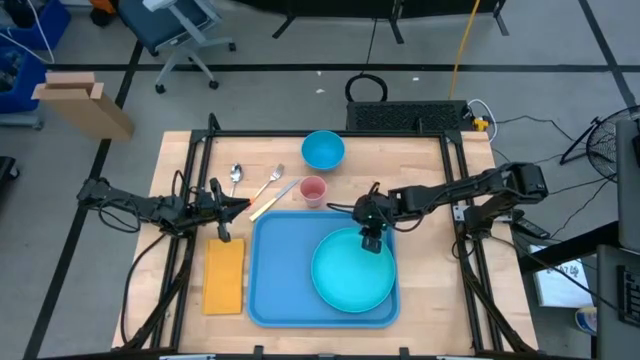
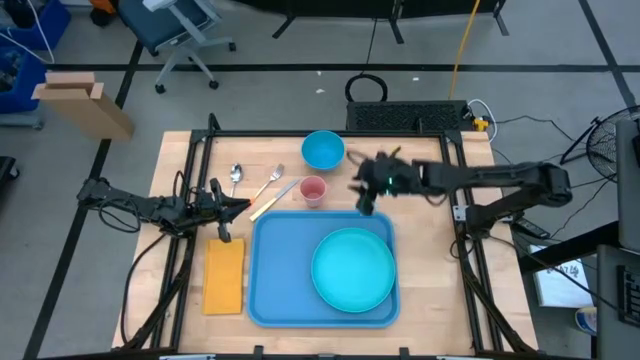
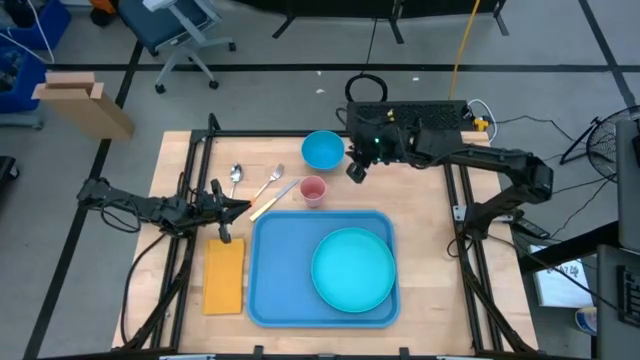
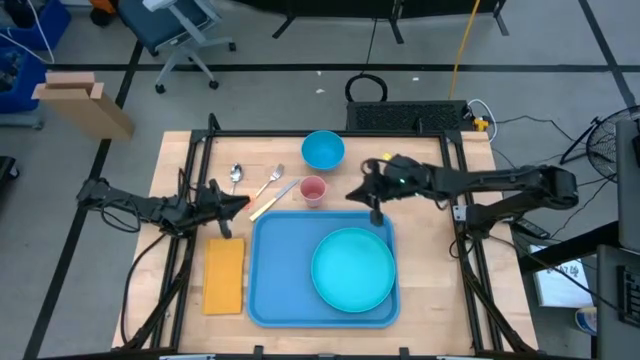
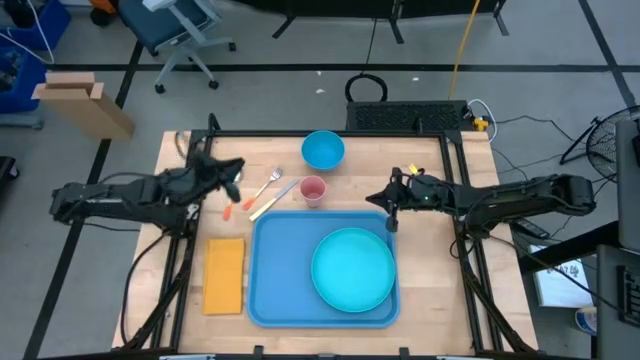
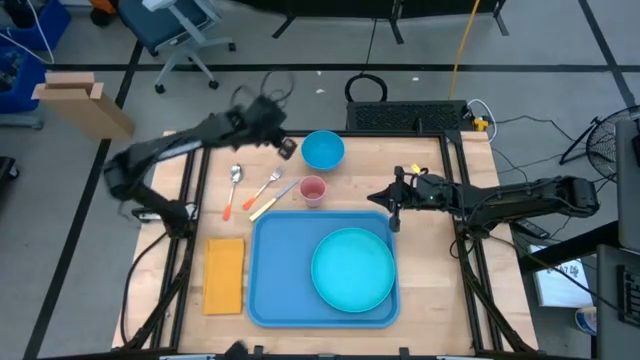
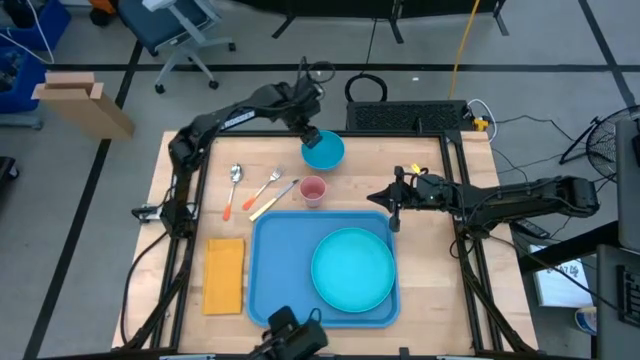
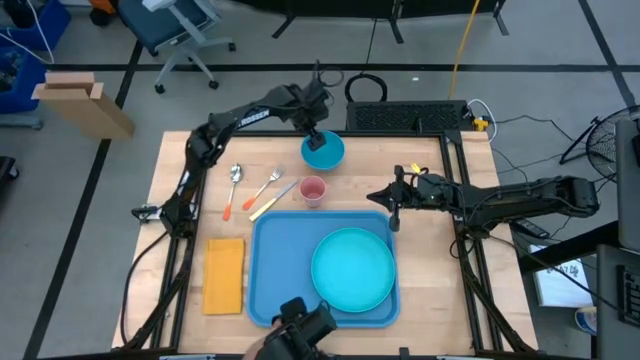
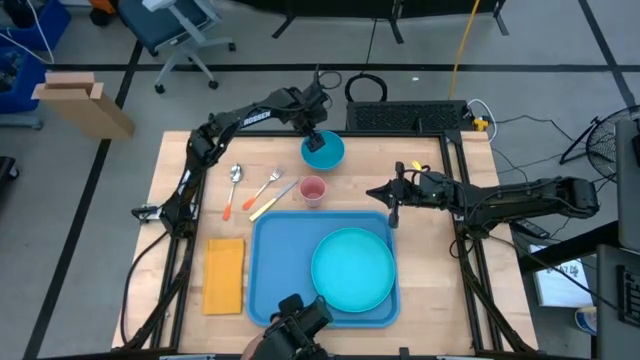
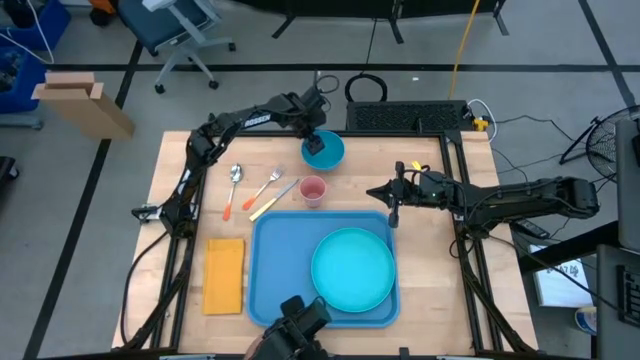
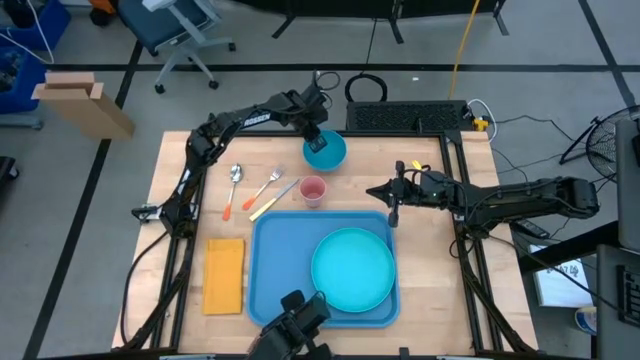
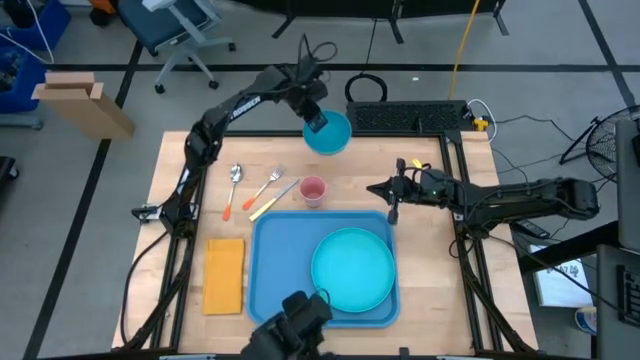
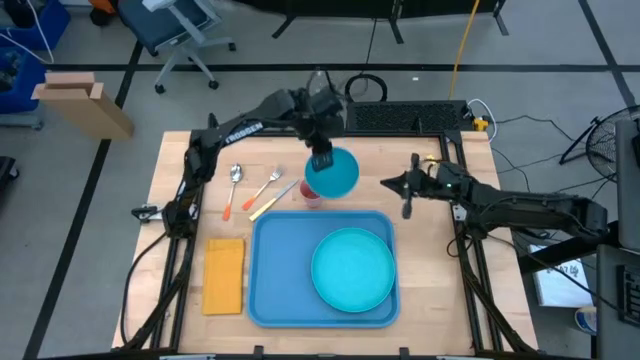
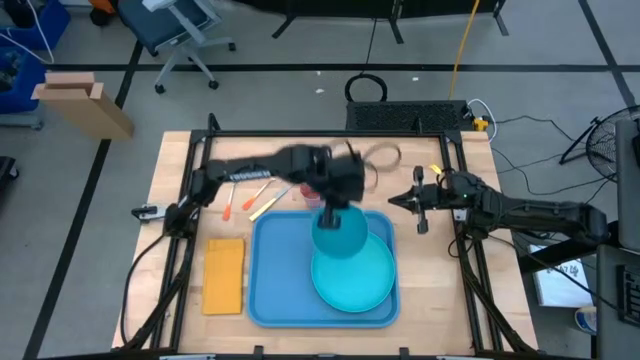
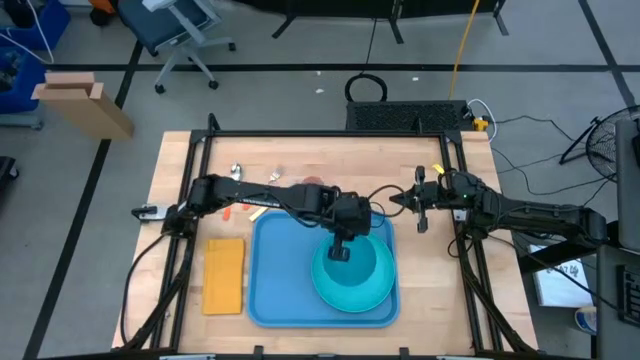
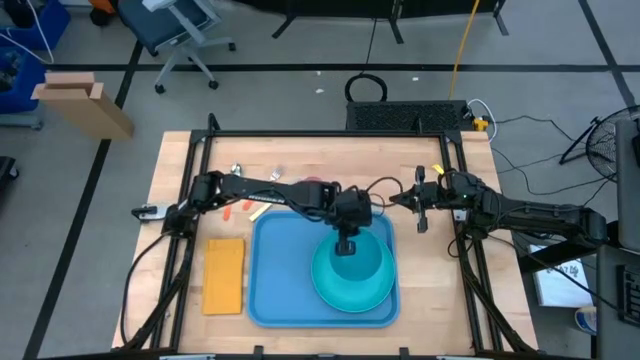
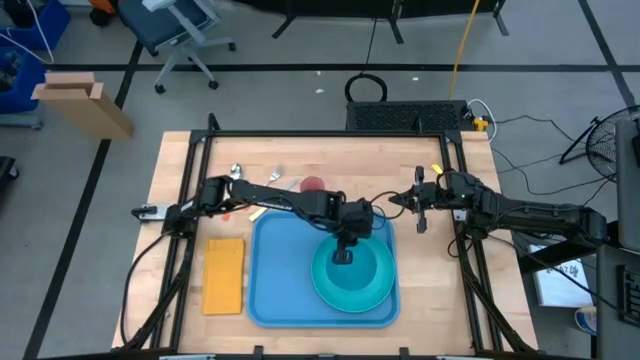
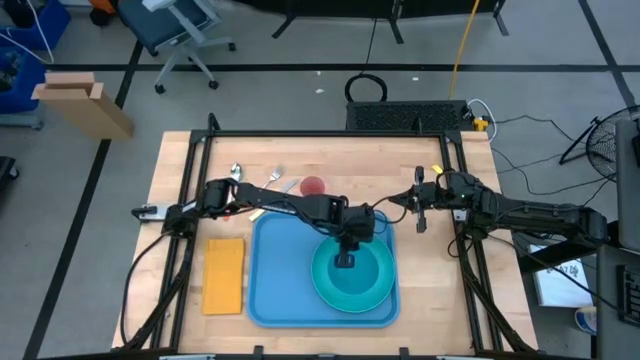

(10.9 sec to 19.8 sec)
Task: Set up tray
Put the blue bowl on the green plate

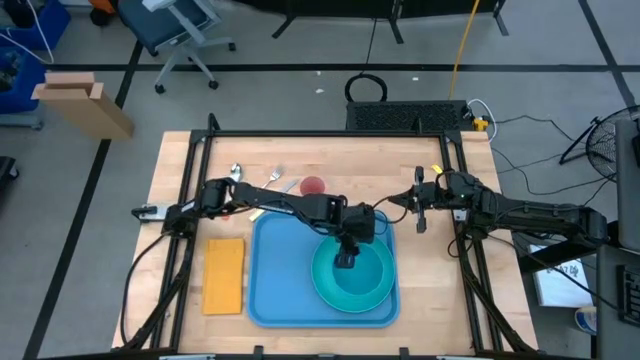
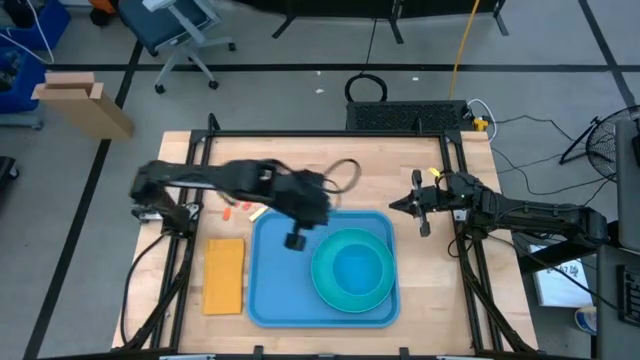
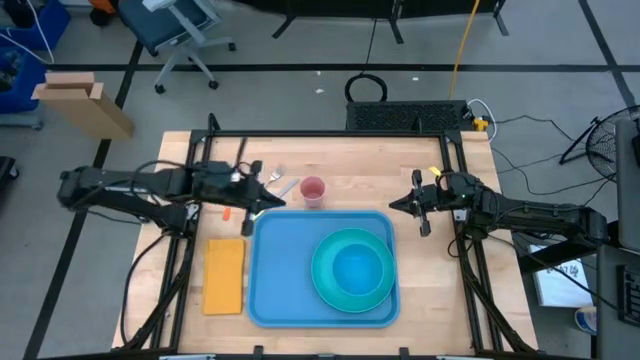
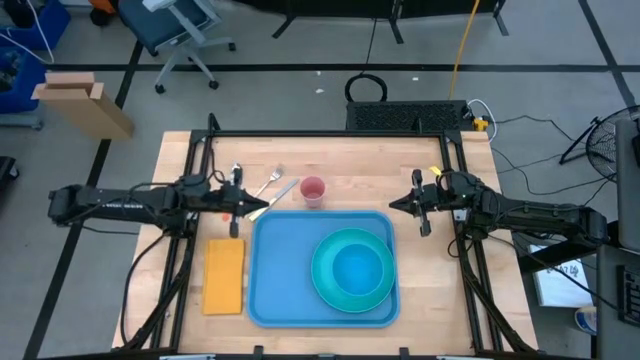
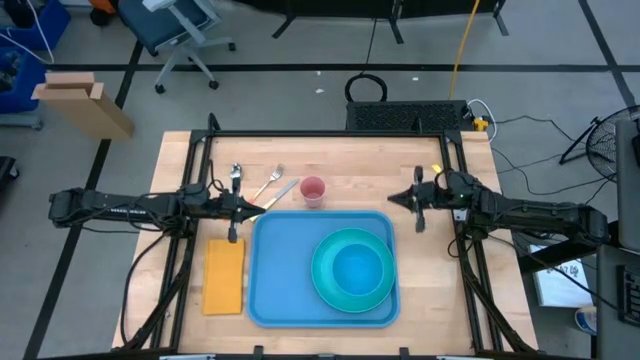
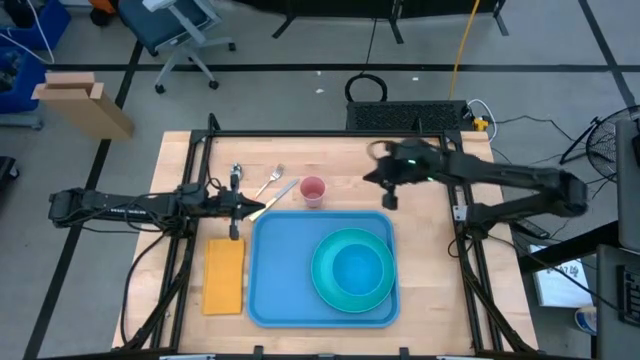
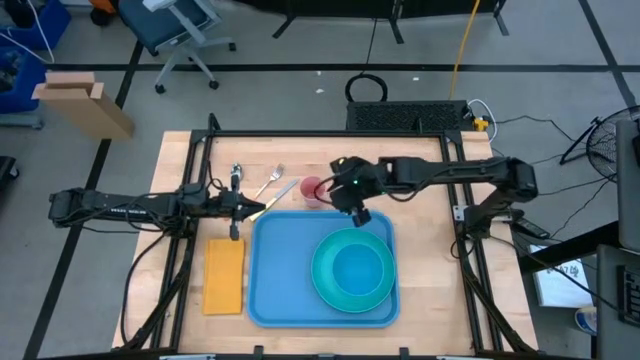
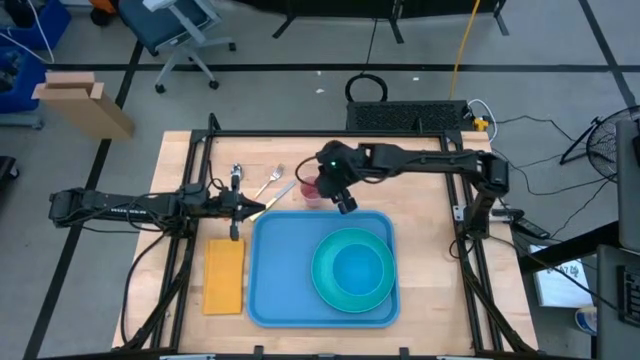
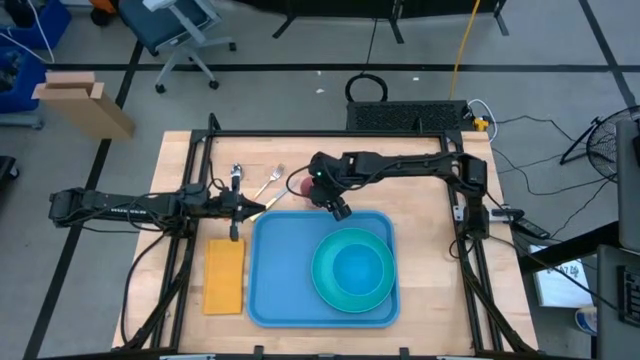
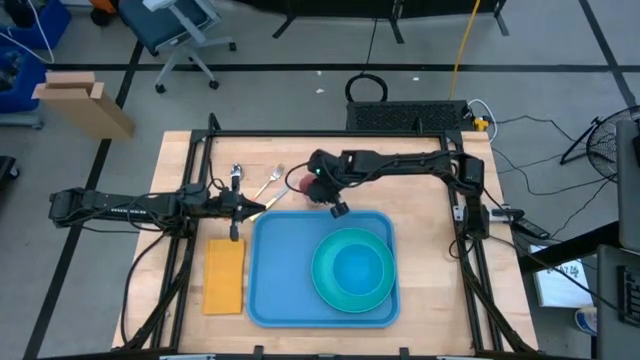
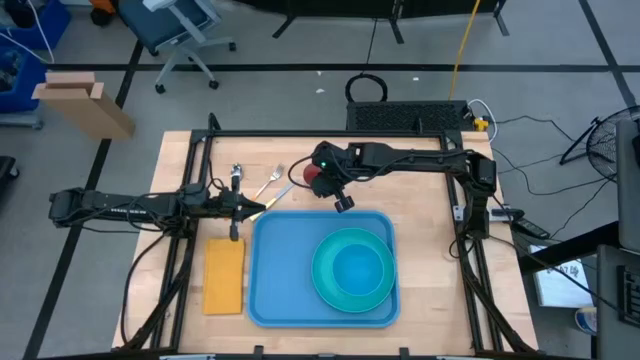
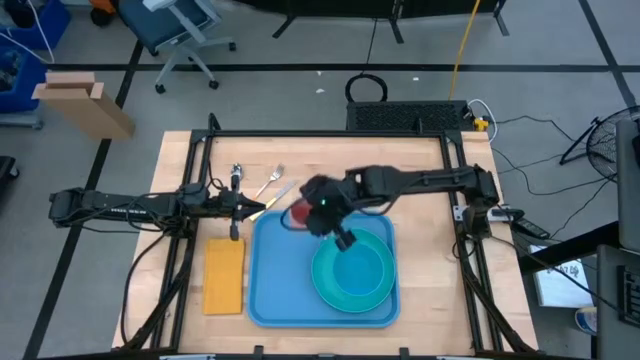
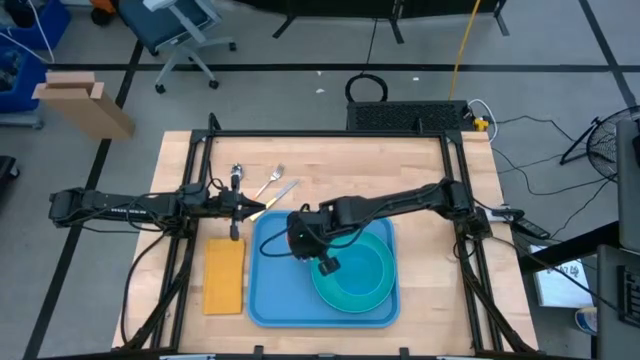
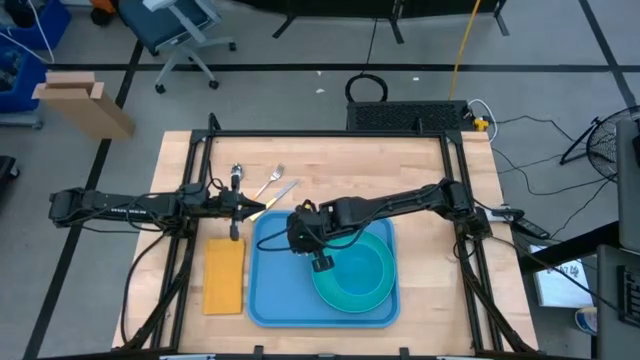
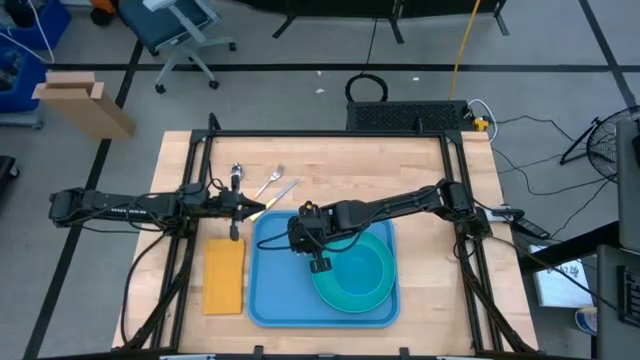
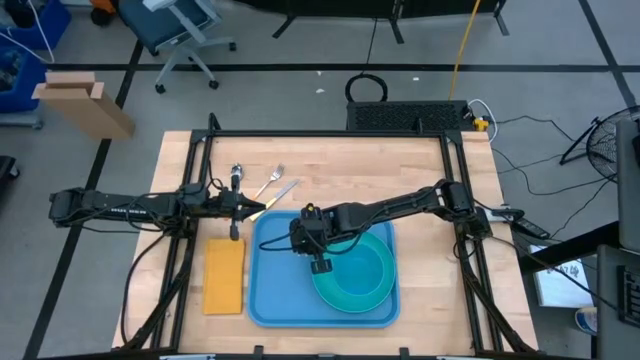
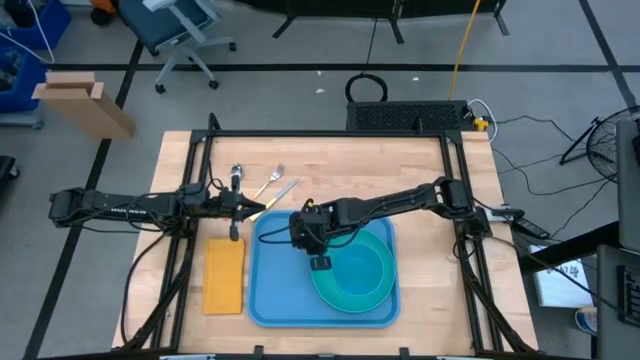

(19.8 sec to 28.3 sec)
Put the pink cup on the top left of the green plate

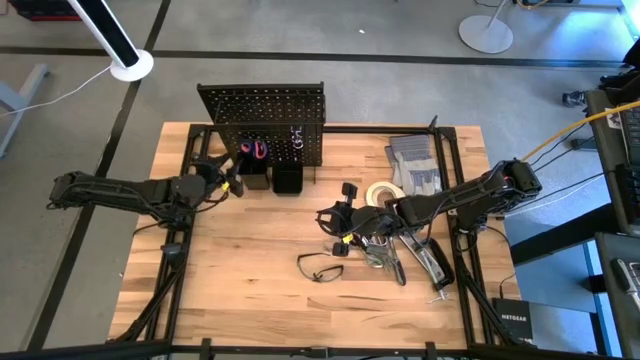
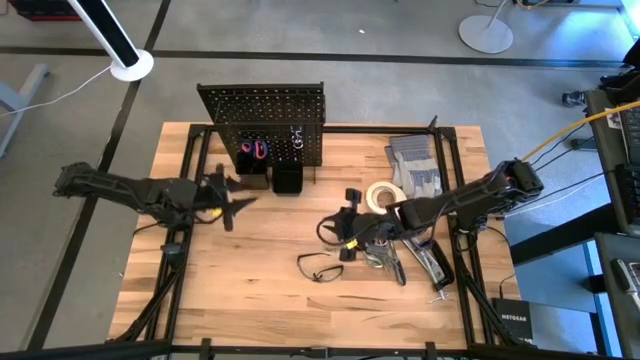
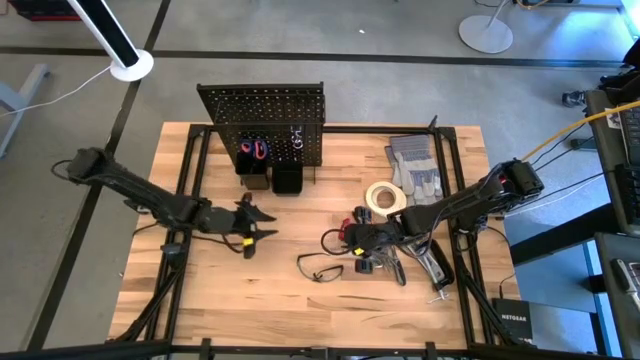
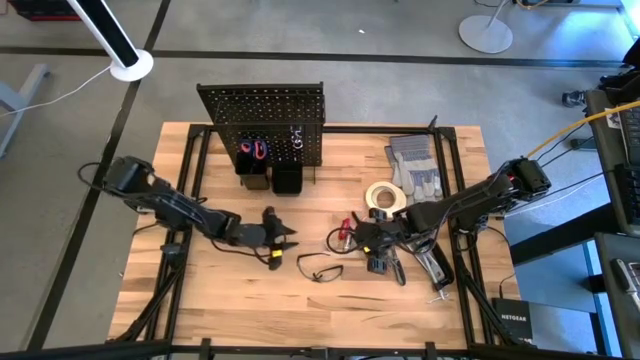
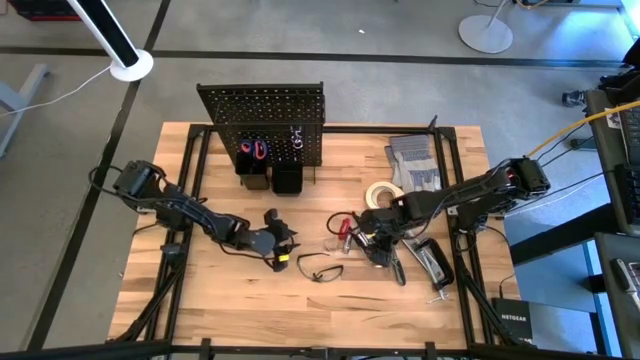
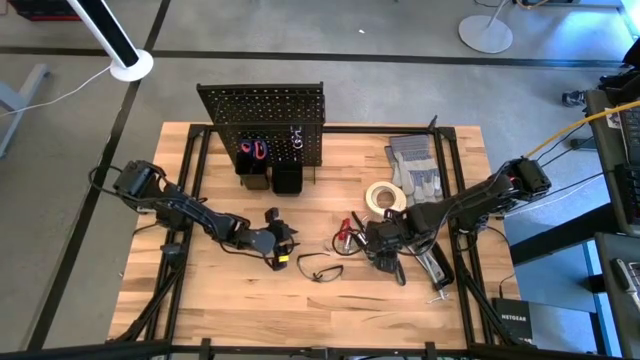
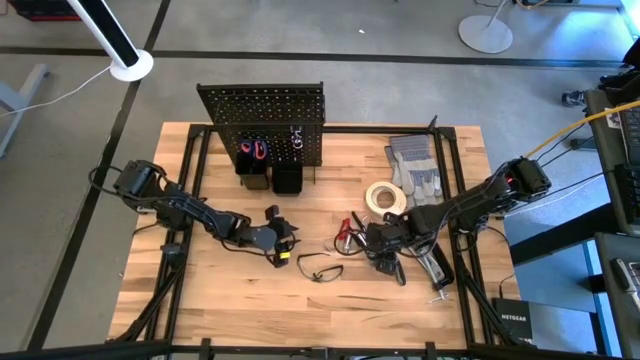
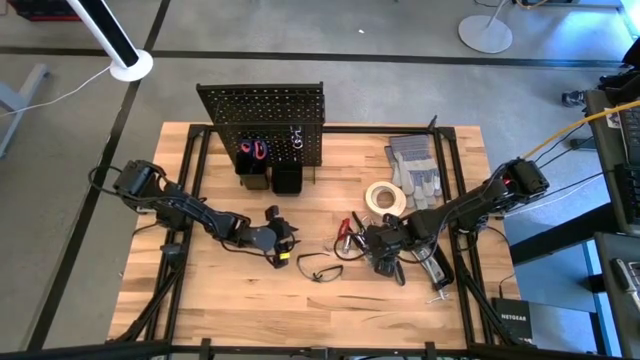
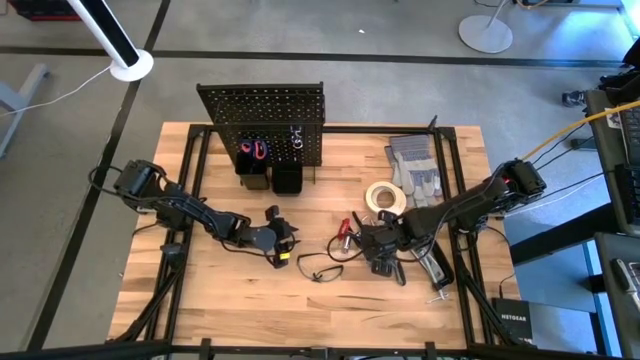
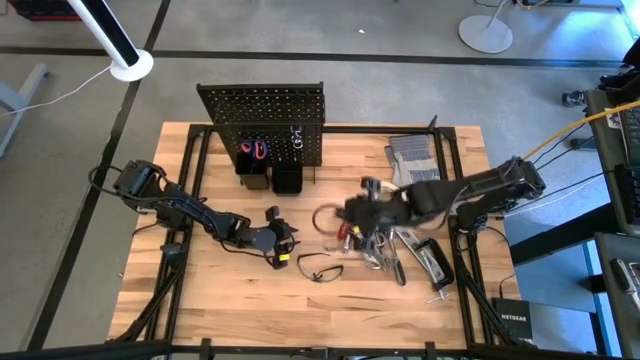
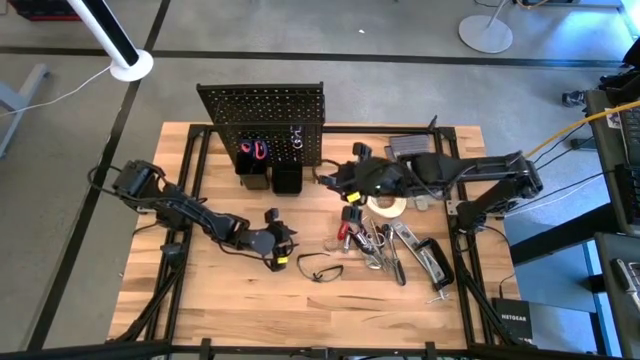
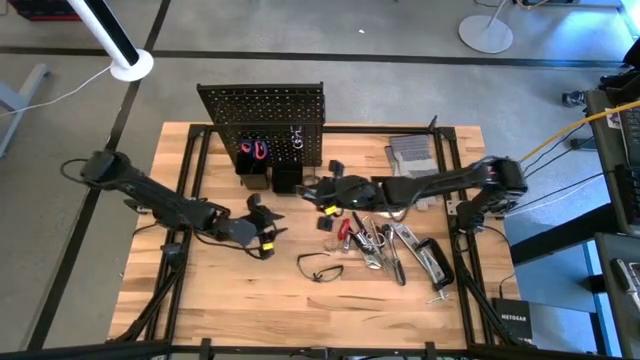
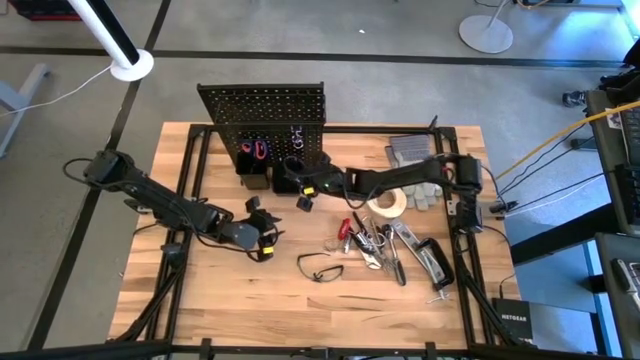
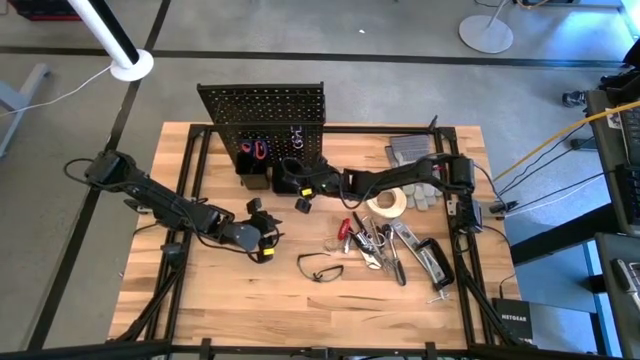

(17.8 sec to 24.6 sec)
Task: Hang tools onto peg board
Put the cuvette into the right pegboard organizer bin
